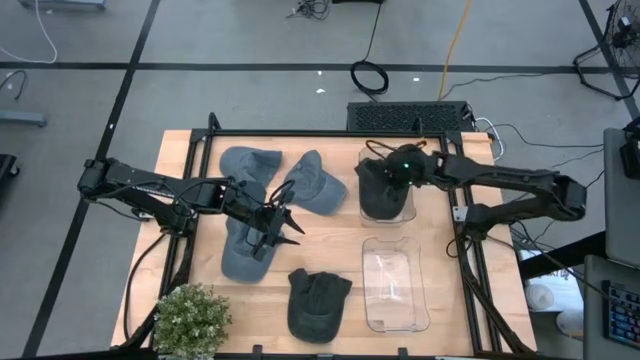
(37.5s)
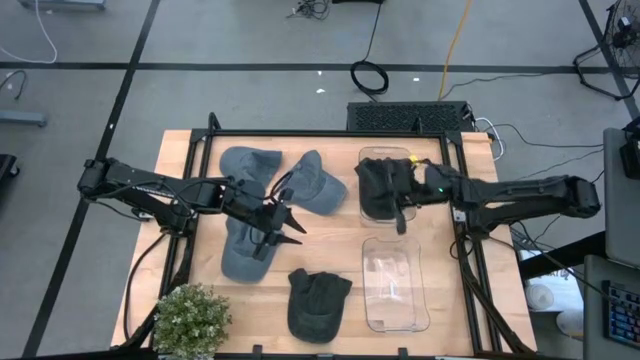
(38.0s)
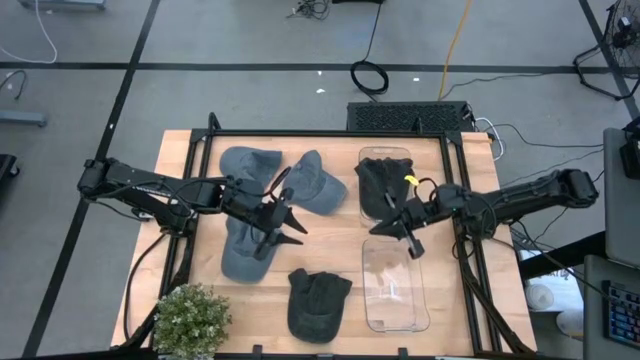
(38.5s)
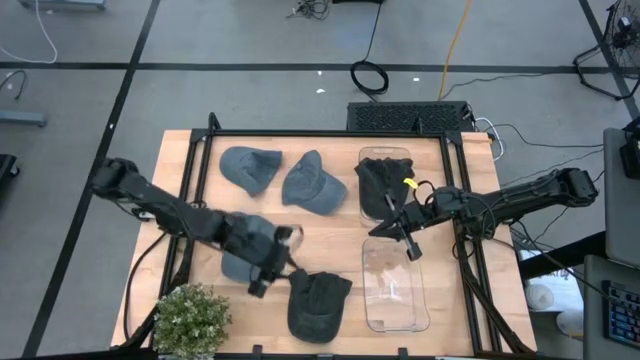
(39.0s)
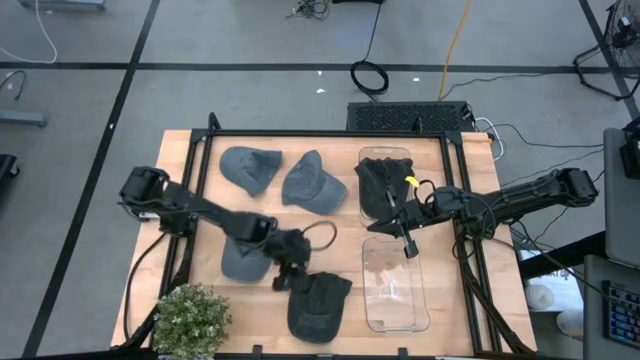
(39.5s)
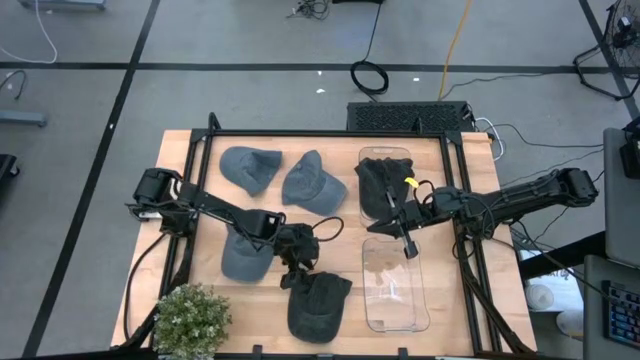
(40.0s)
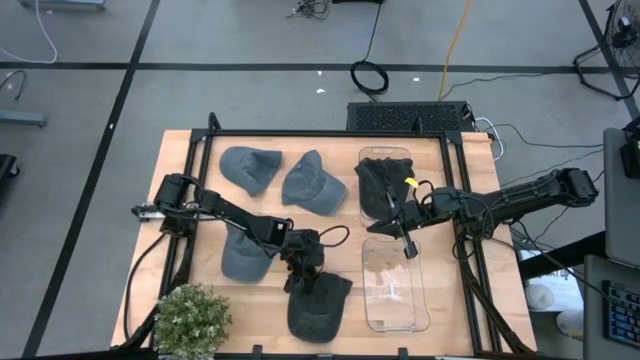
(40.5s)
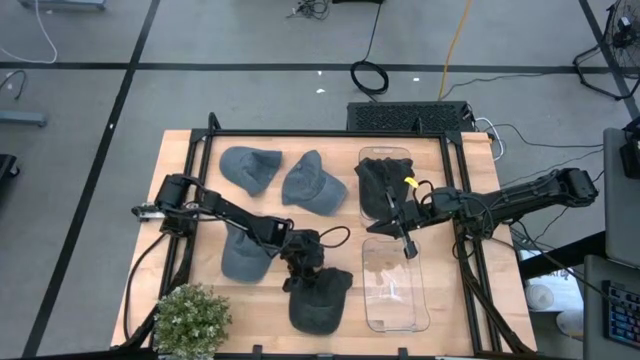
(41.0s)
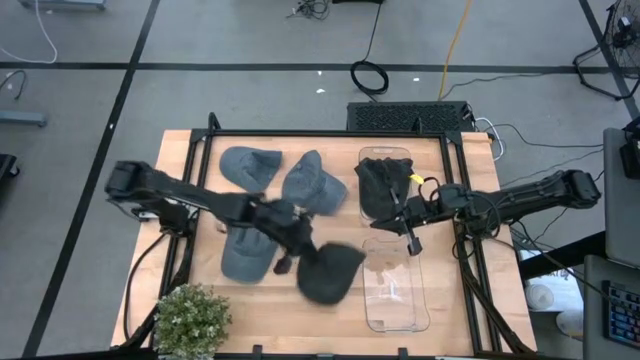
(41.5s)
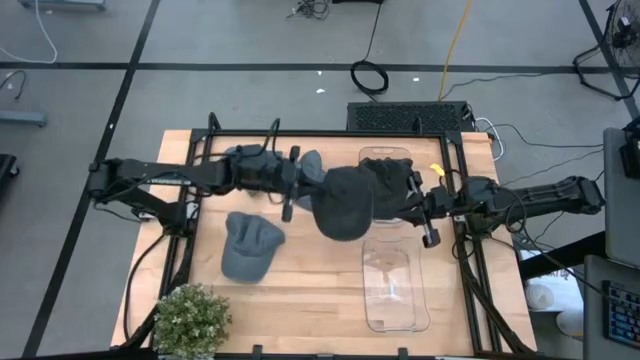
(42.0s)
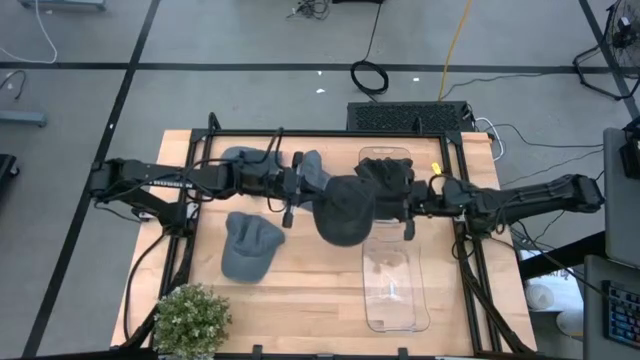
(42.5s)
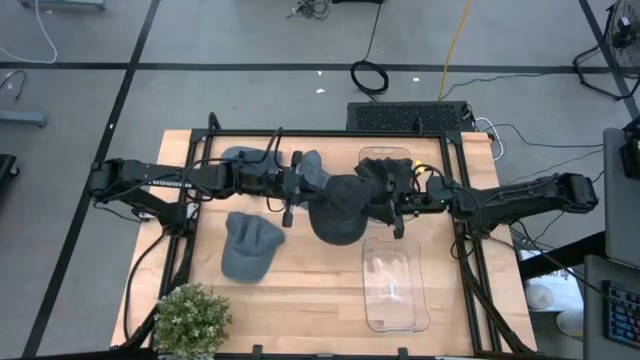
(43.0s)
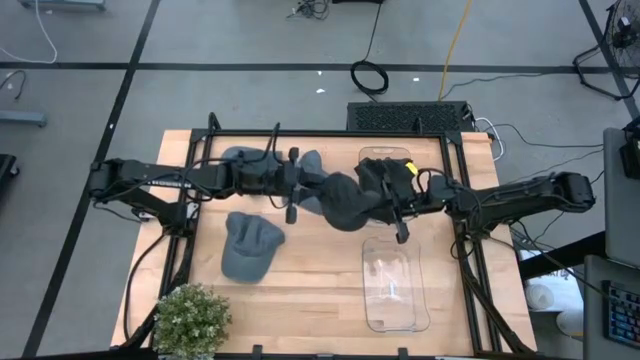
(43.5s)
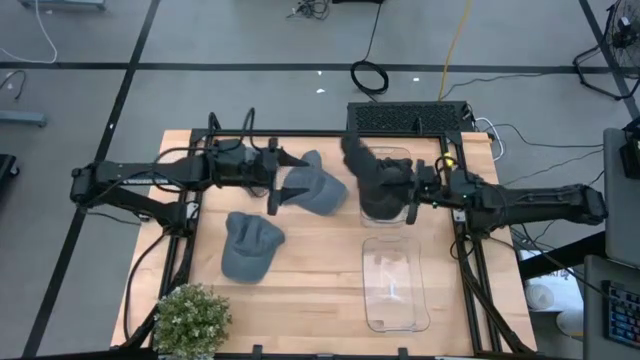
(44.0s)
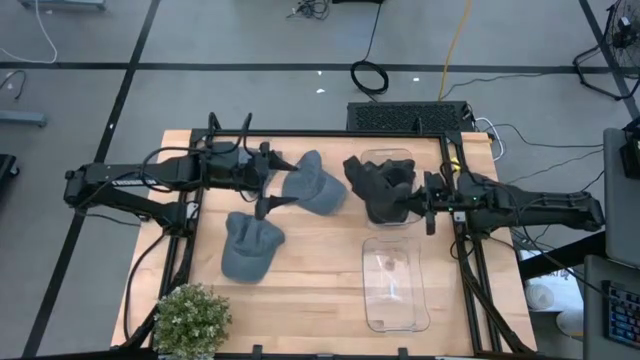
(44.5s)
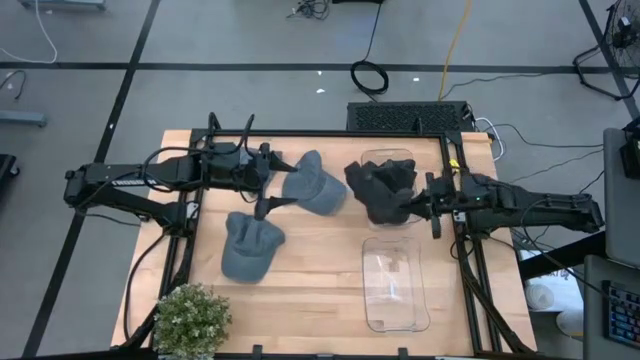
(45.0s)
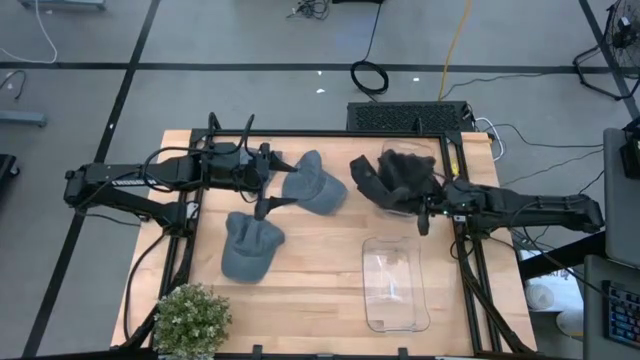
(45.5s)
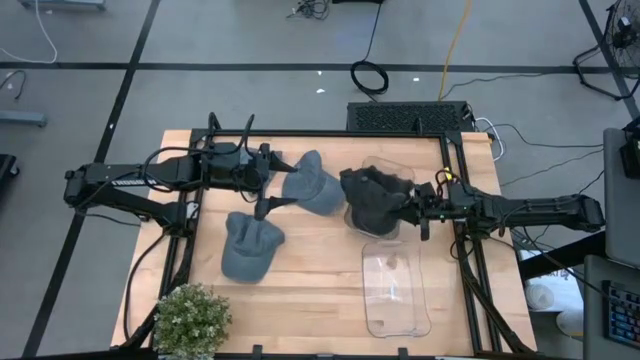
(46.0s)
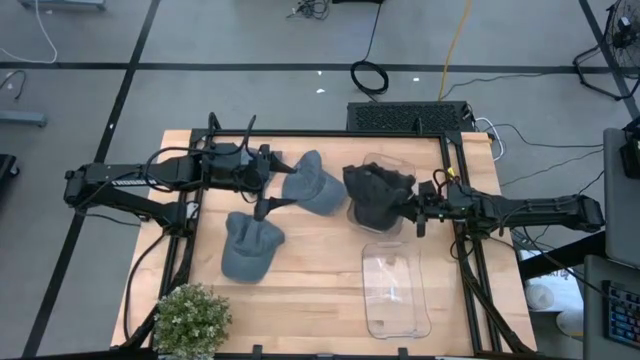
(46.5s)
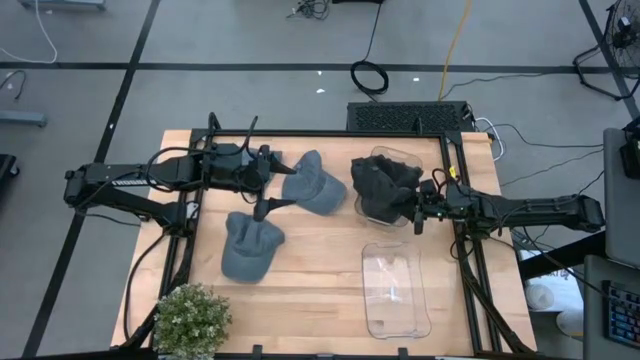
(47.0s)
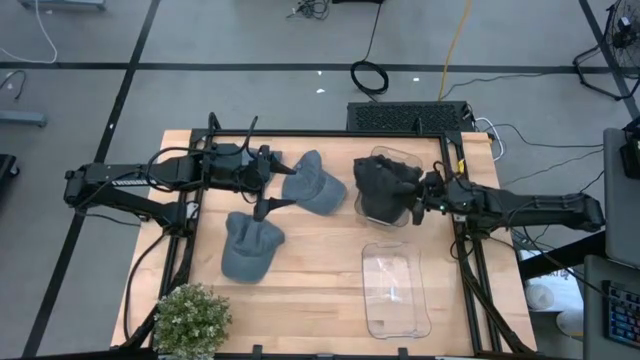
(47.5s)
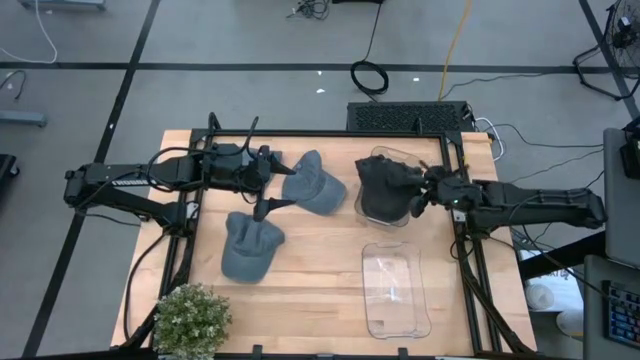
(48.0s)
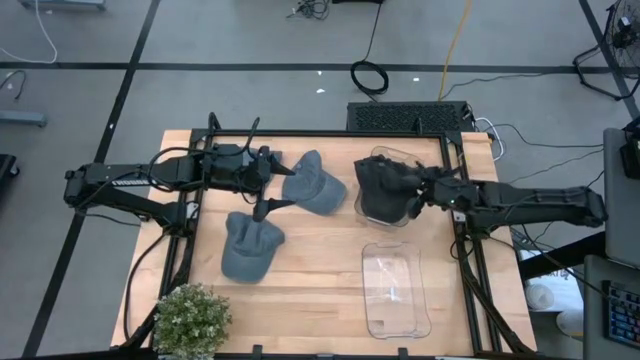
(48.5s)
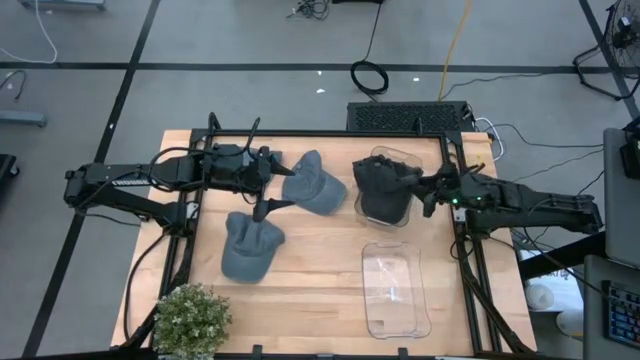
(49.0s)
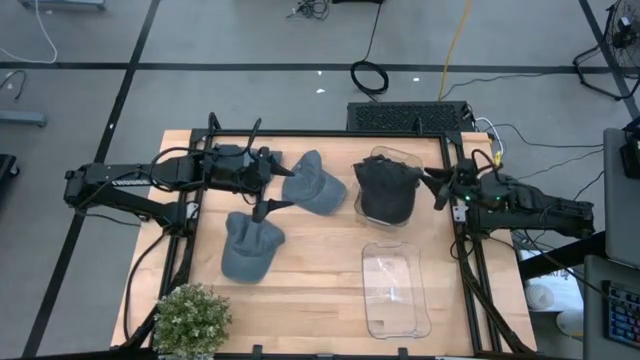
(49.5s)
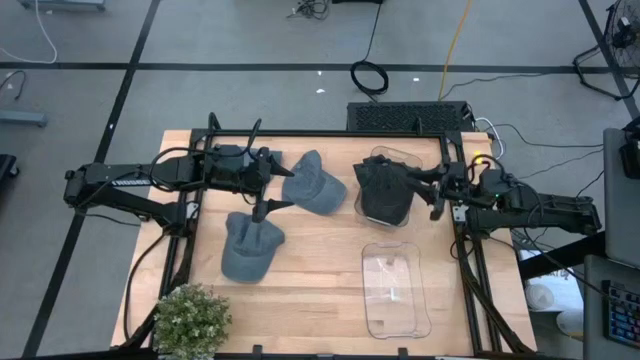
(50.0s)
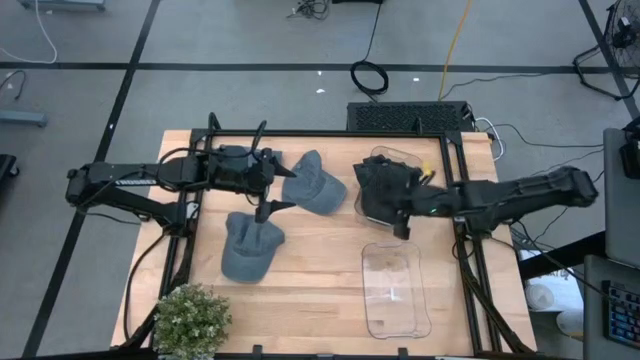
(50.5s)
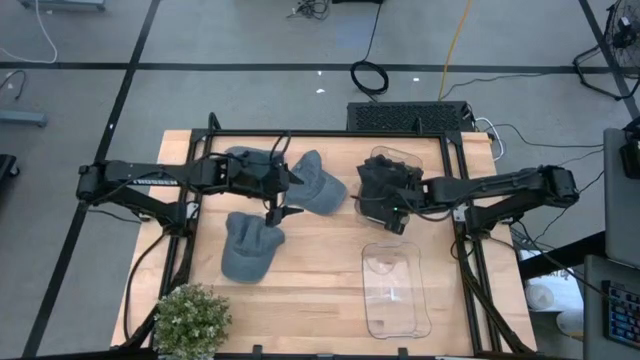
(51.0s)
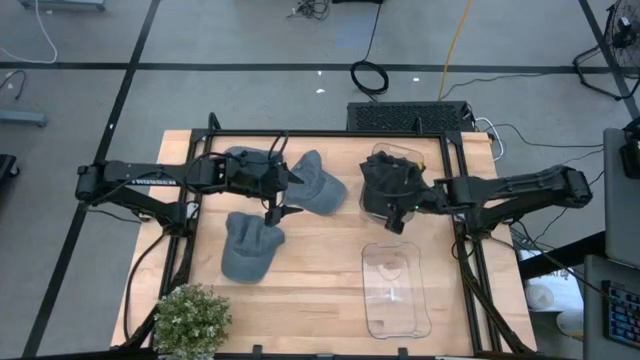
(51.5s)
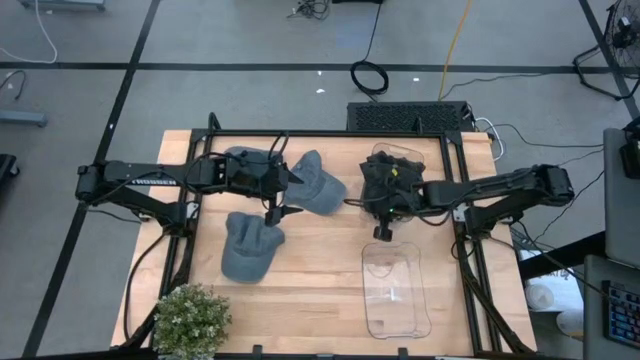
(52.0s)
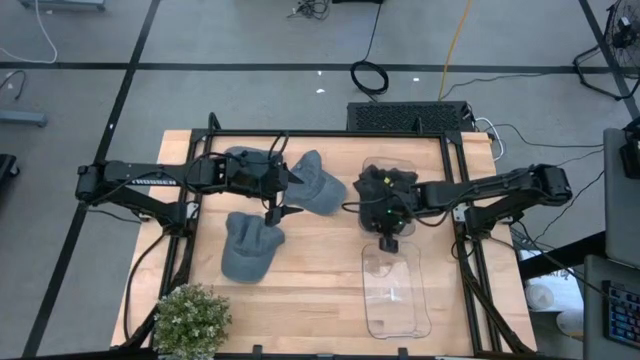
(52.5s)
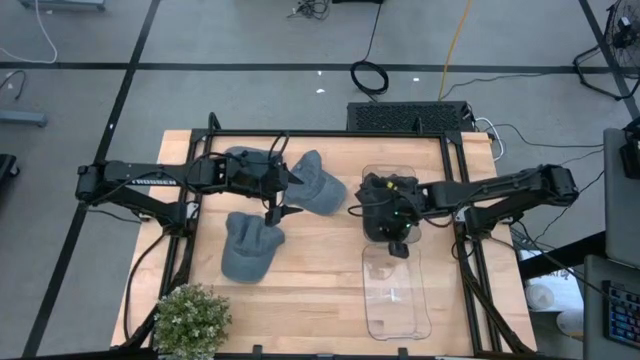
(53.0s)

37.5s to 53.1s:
Task: Pick & Place hat
Put the black cap into the top transparent bin

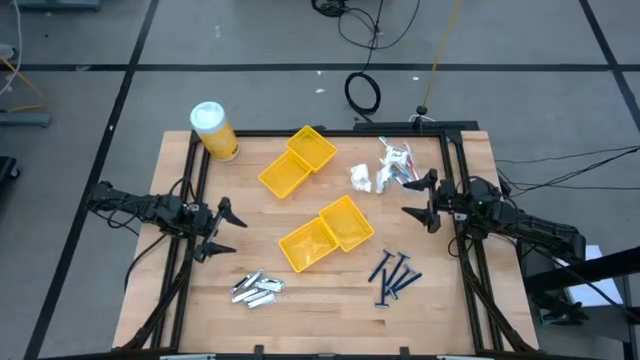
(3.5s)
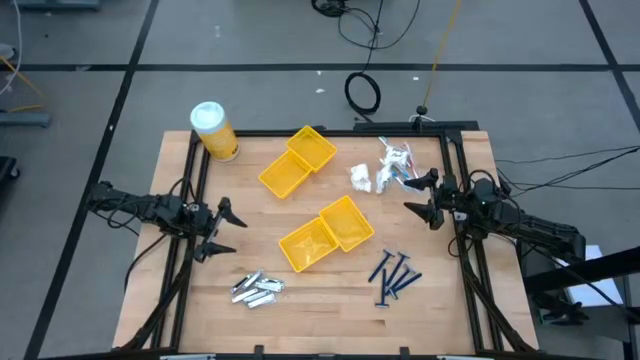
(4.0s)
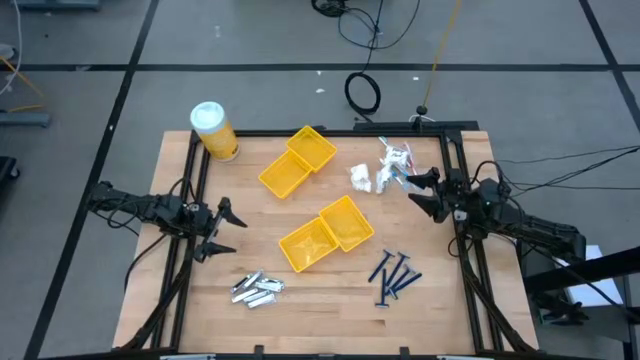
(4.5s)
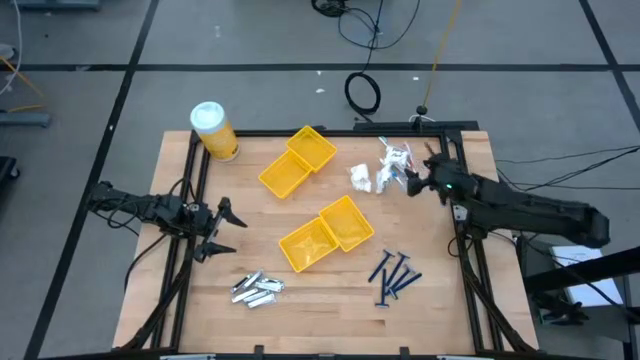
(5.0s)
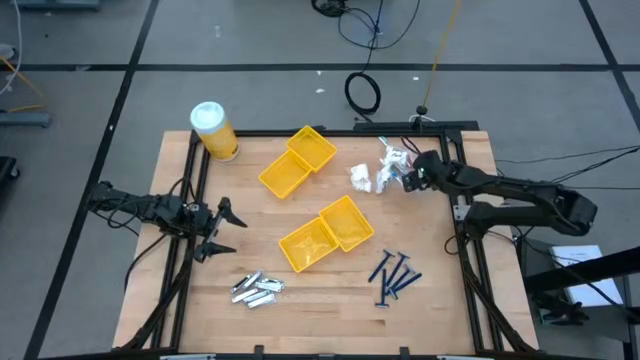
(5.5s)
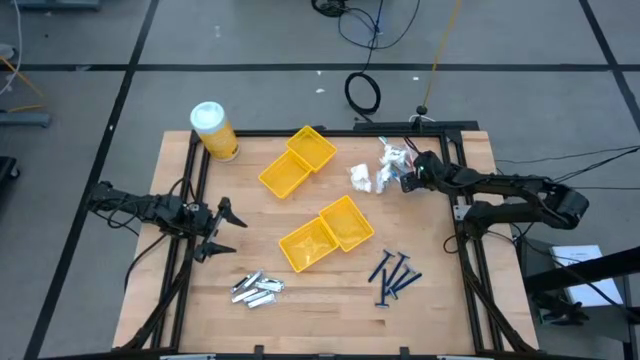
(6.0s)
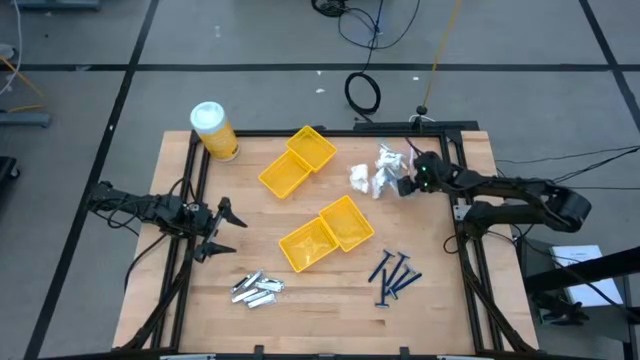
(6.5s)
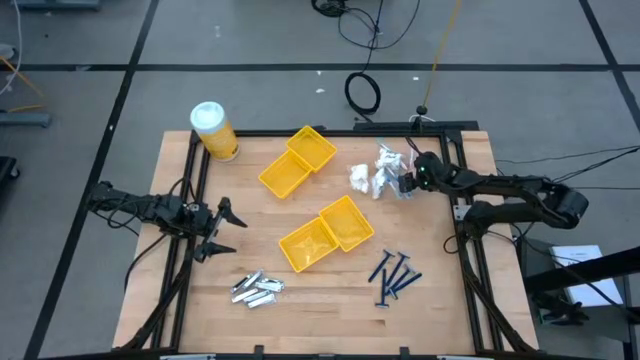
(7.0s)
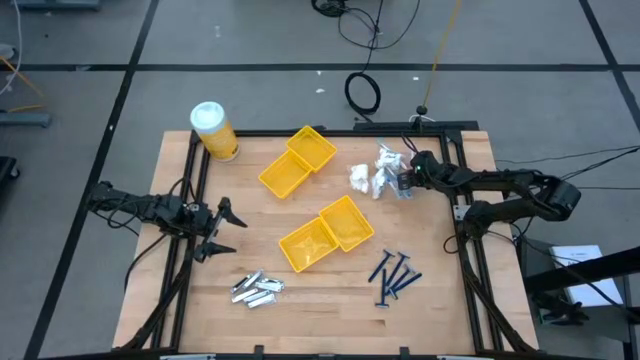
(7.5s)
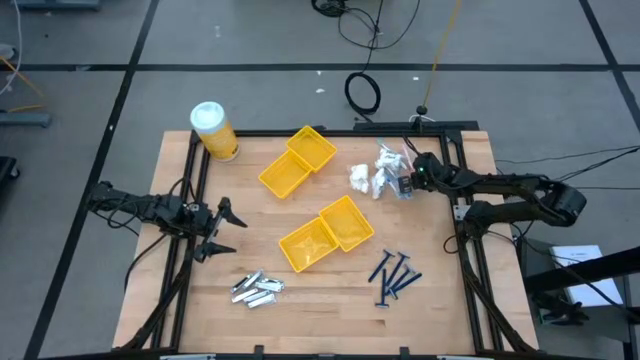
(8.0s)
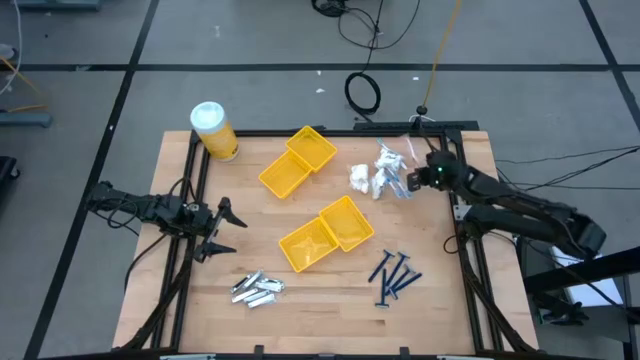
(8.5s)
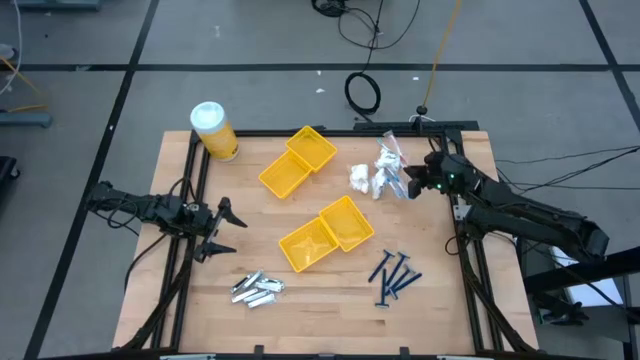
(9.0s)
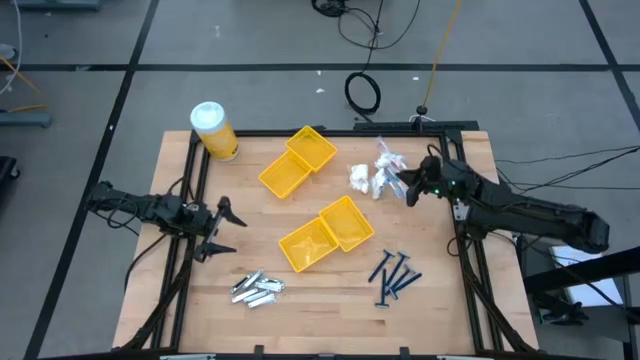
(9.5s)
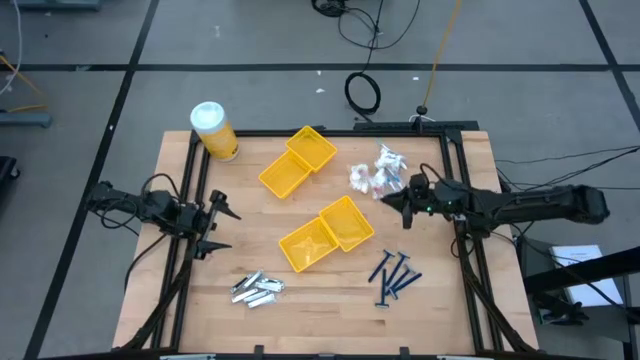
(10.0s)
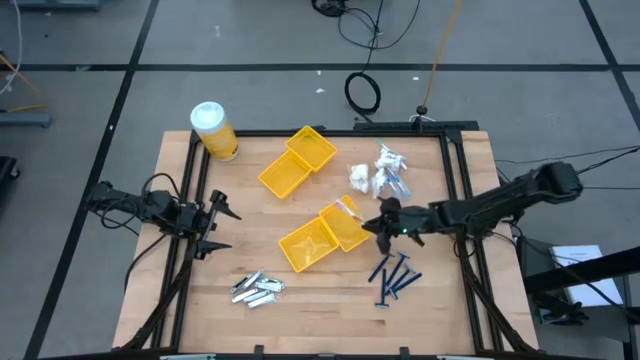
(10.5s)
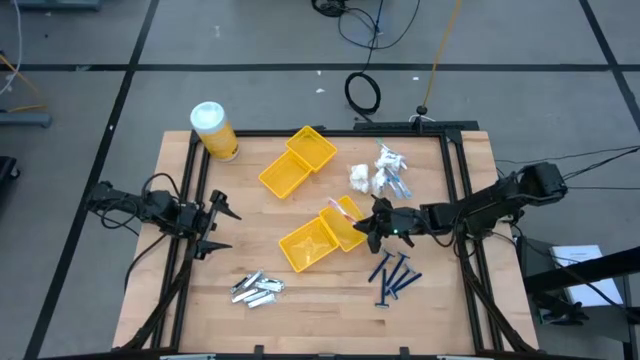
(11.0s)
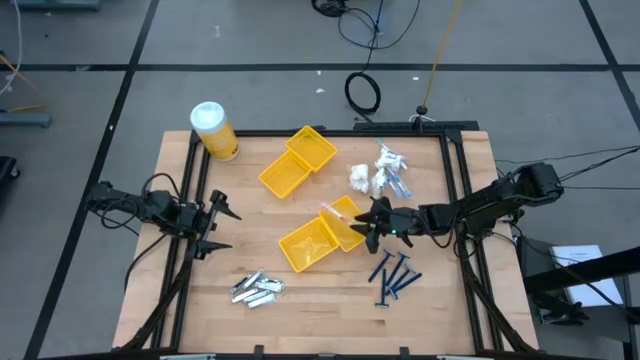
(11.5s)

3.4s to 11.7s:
Task: Pick & Place Travel size toiletries
Put the orange toothbrush into the bottom right yellow basket
